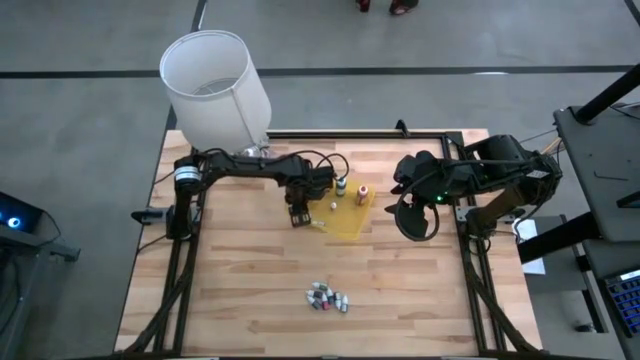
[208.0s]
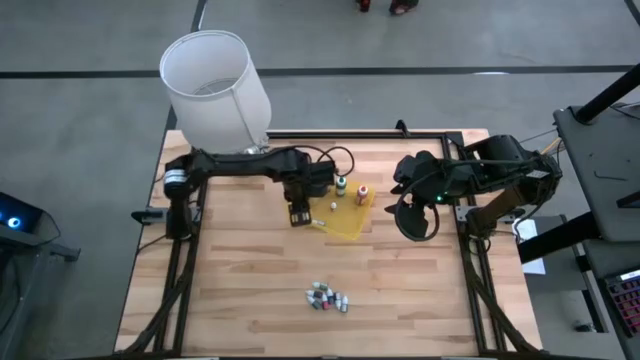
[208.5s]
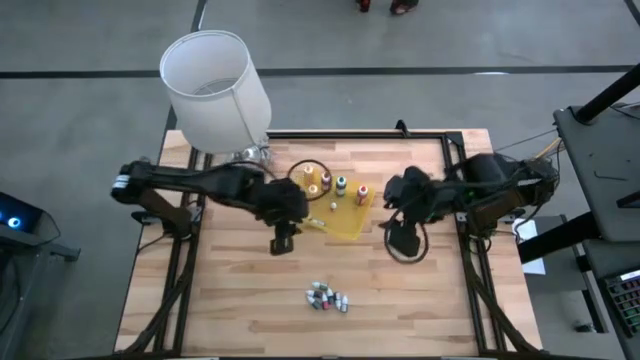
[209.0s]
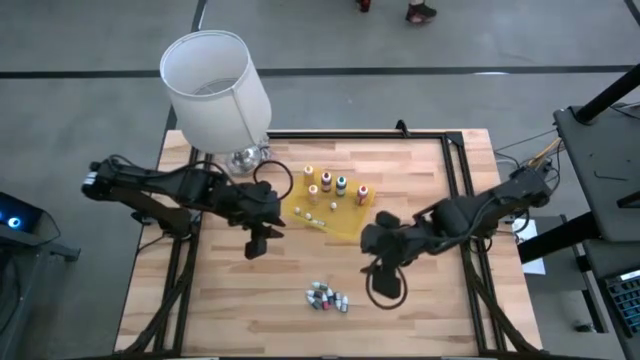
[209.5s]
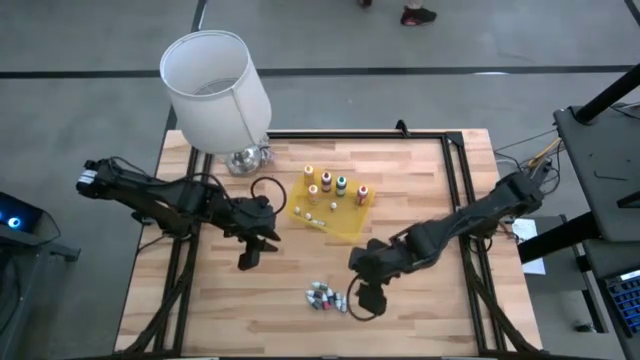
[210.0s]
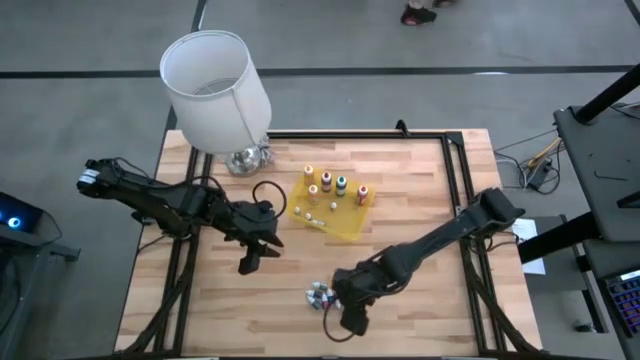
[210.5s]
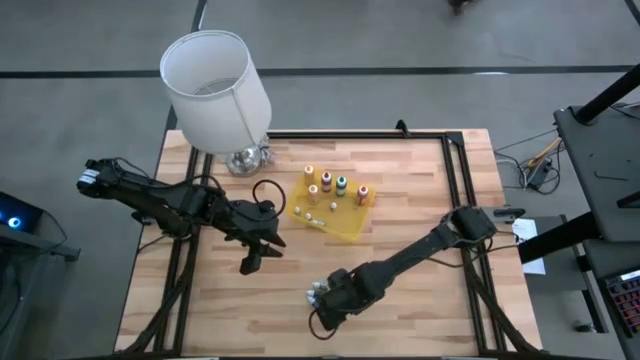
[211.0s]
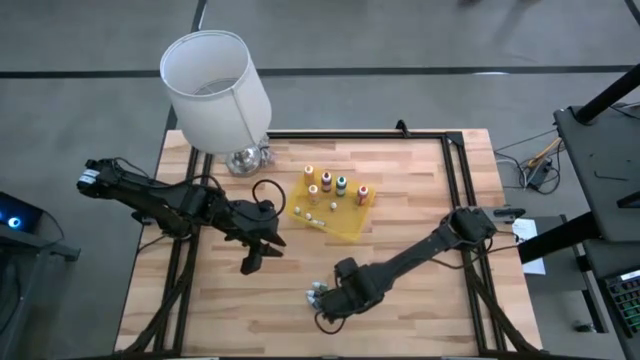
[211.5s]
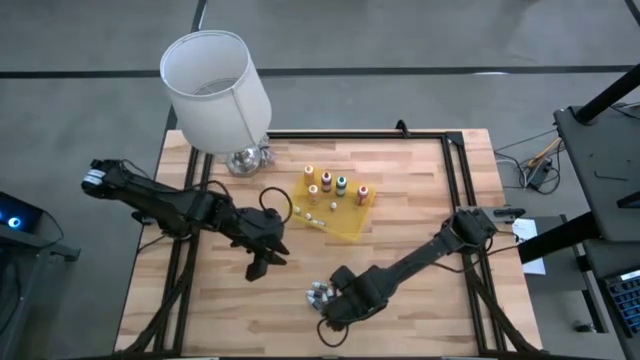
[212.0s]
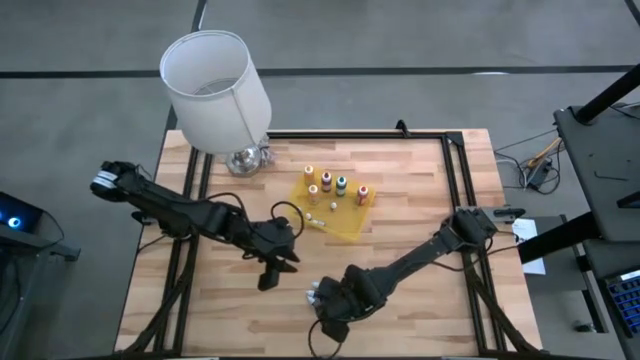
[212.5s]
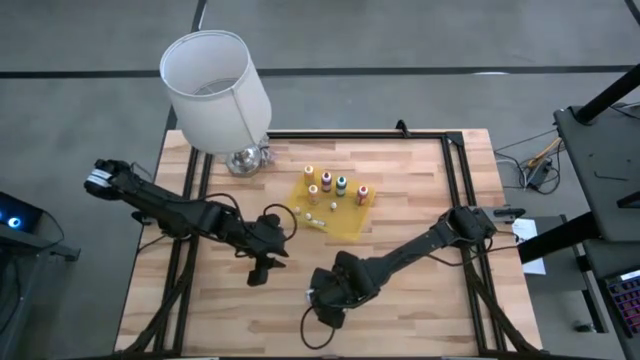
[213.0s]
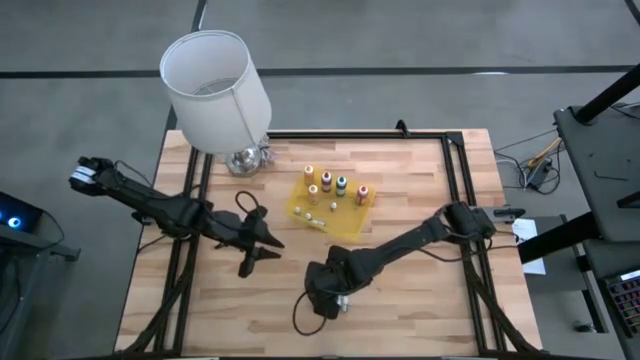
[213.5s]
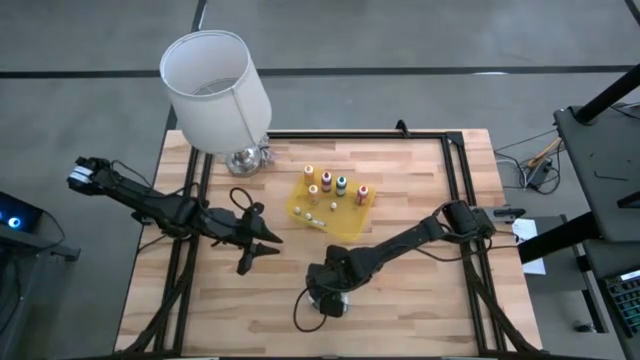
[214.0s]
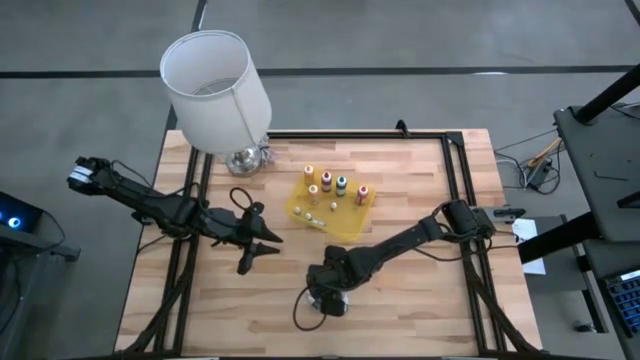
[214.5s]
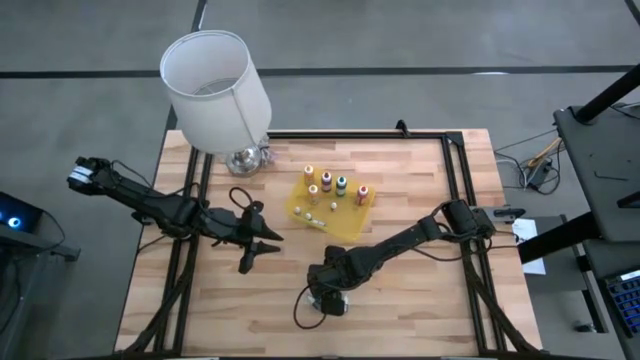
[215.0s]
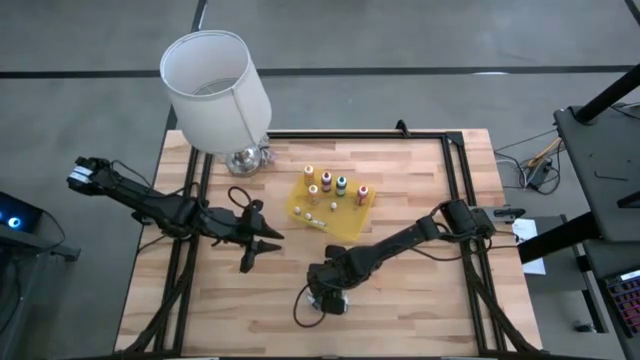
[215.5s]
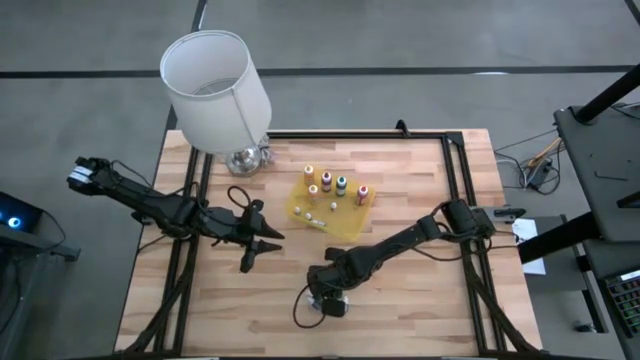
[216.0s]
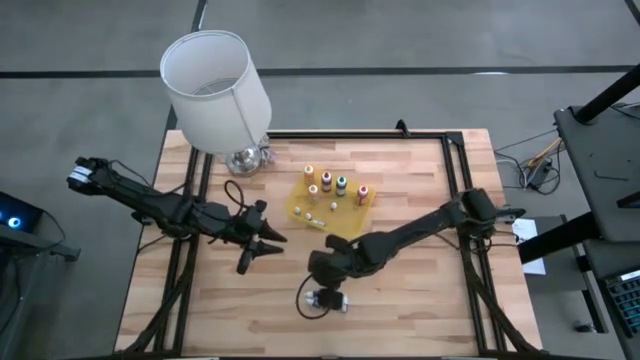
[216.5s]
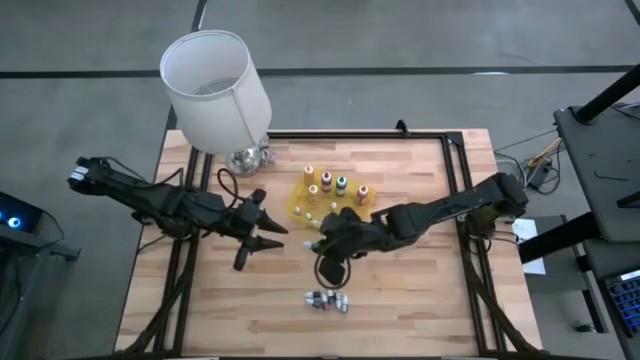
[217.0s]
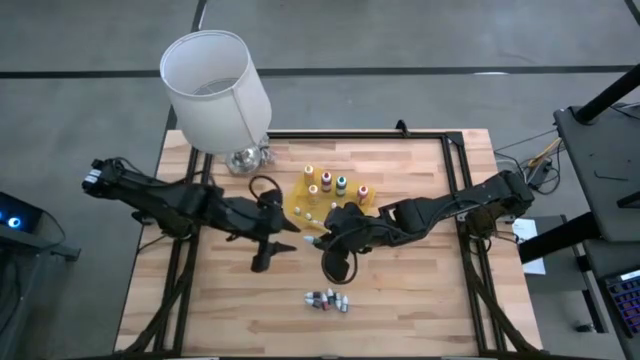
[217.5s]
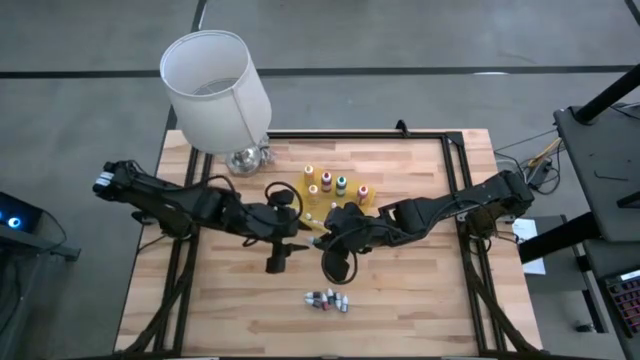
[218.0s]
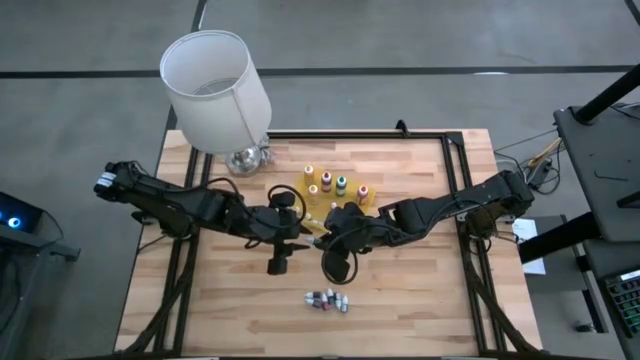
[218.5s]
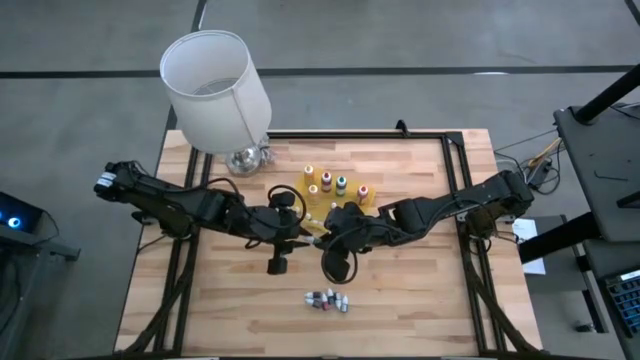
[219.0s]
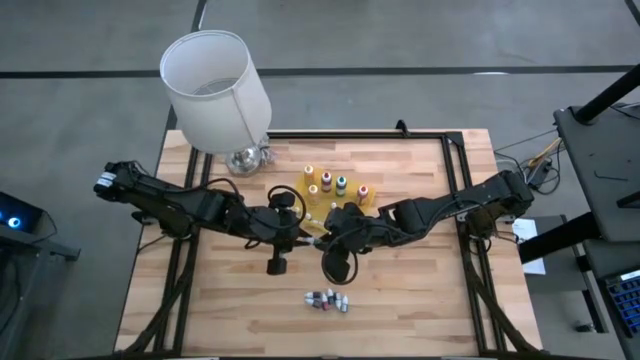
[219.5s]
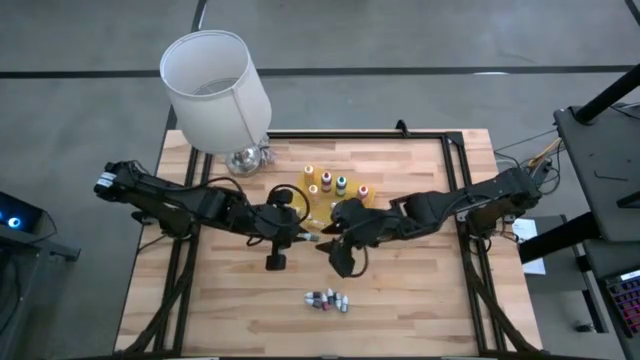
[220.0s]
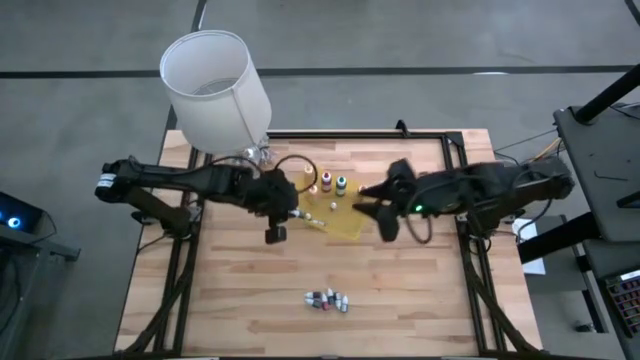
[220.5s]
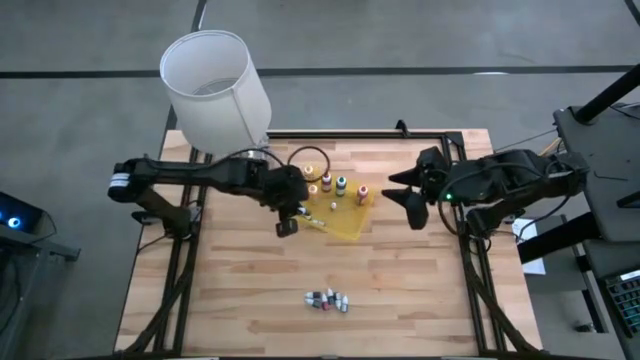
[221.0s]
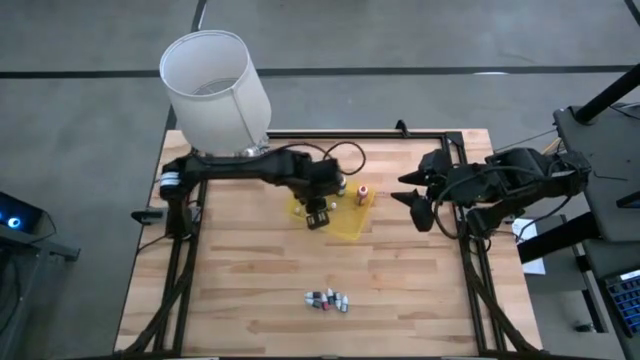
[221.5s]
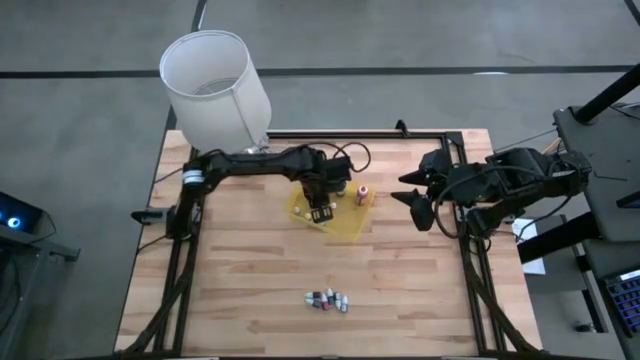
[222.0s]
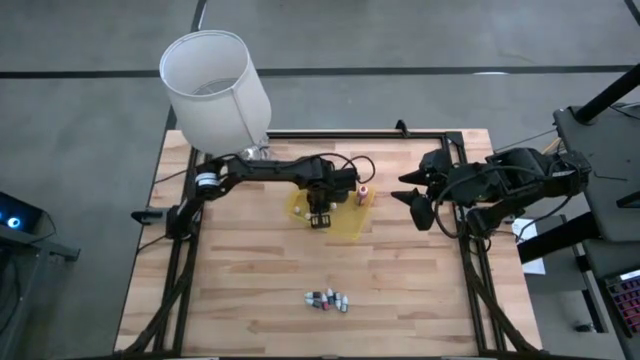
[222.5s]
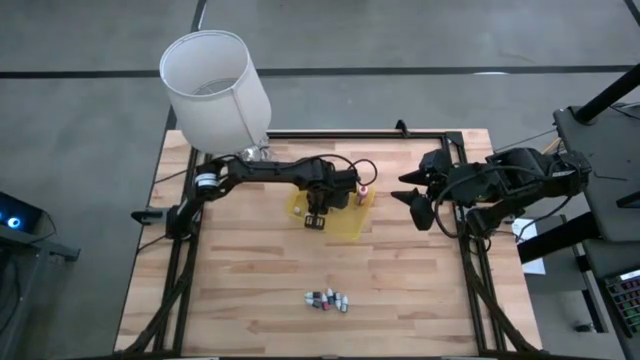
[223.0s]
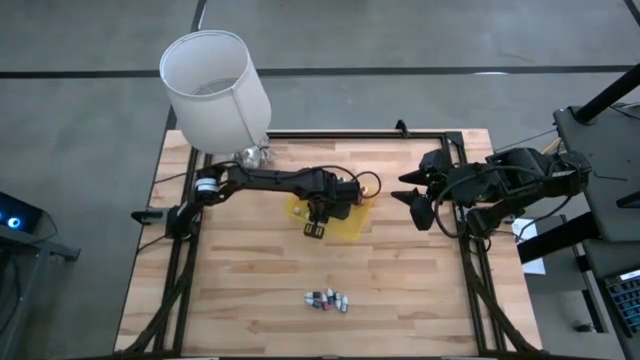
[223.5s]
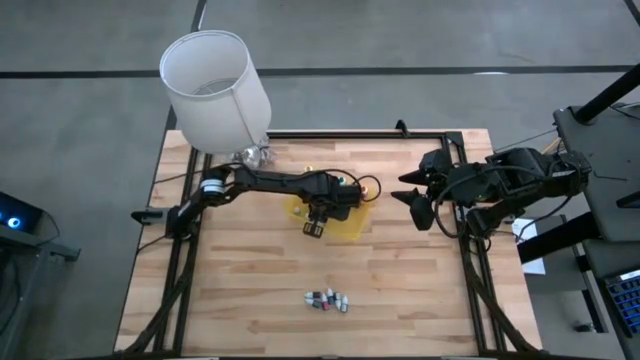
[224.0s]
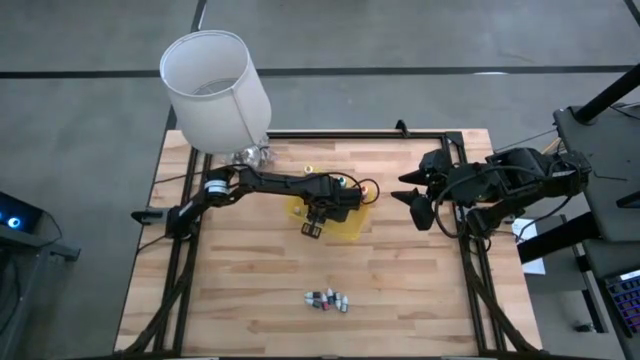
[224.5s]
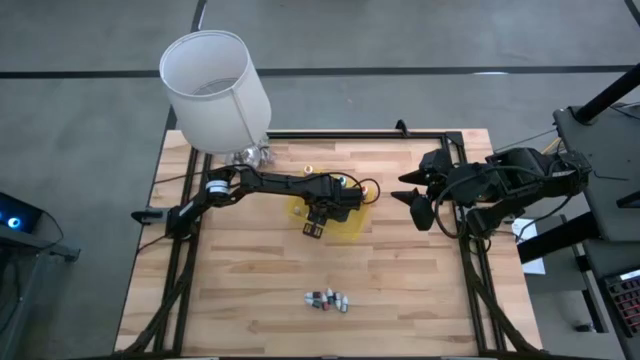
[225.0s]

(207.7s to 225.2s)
Task: Pick & Place food coloring
Put the small green food coloring bottle into the yellow bin

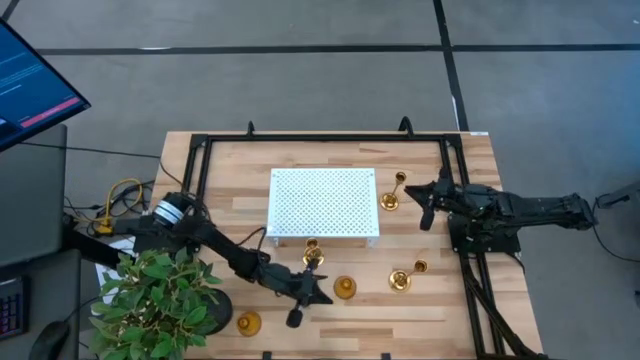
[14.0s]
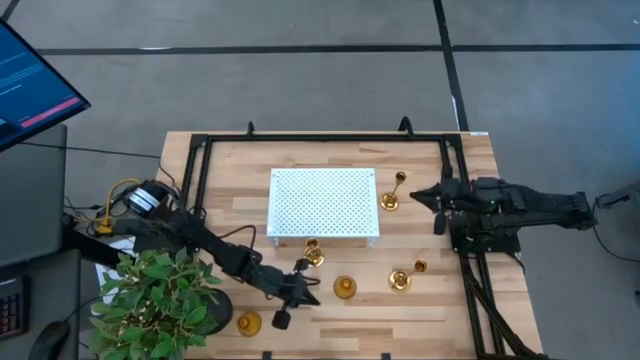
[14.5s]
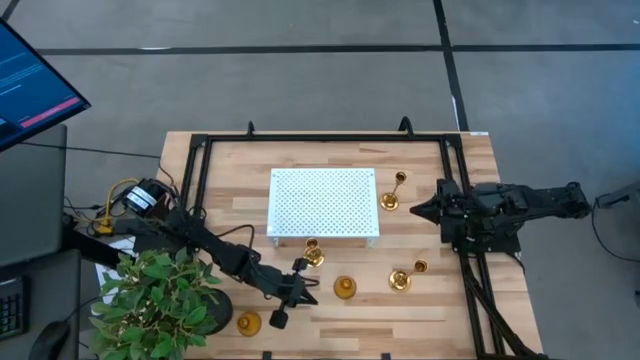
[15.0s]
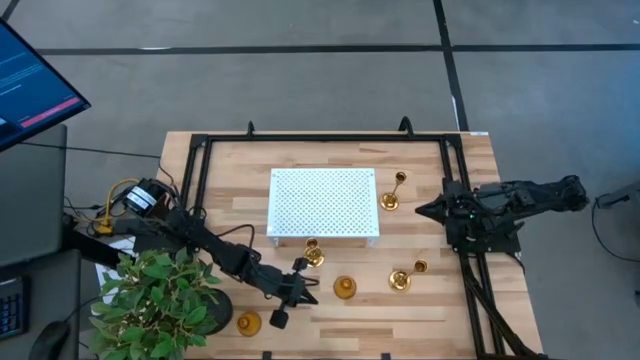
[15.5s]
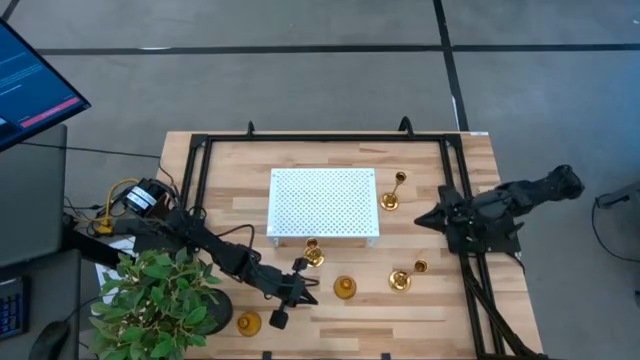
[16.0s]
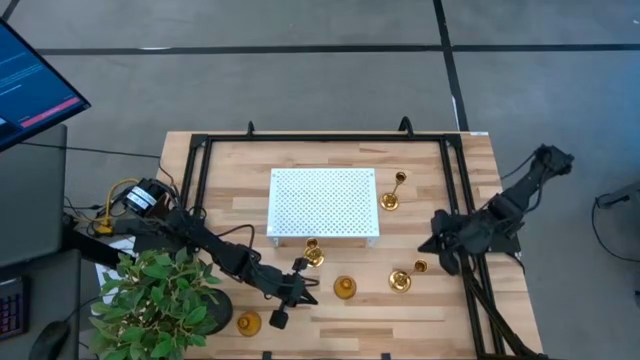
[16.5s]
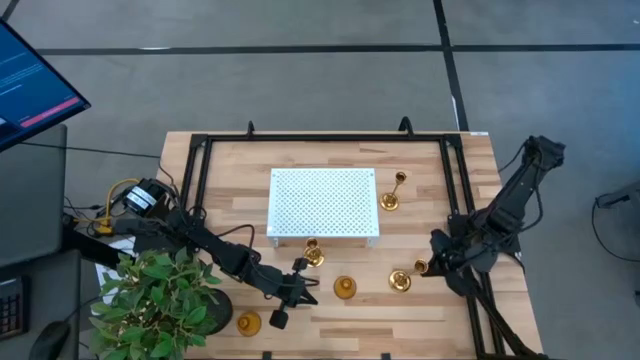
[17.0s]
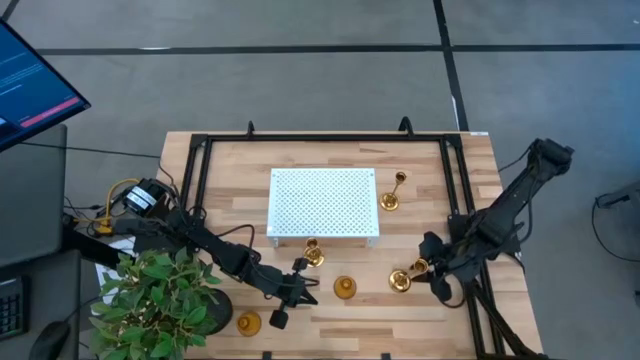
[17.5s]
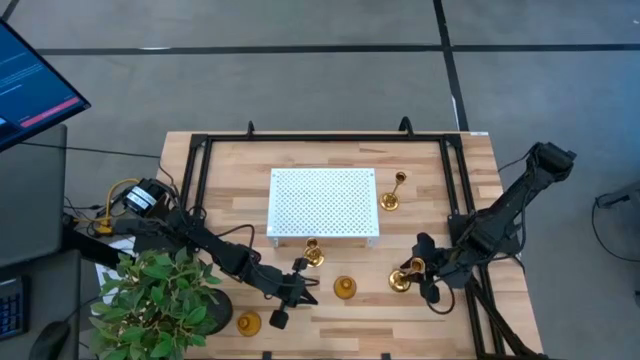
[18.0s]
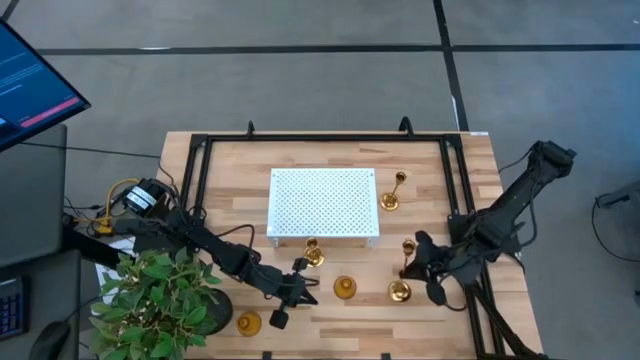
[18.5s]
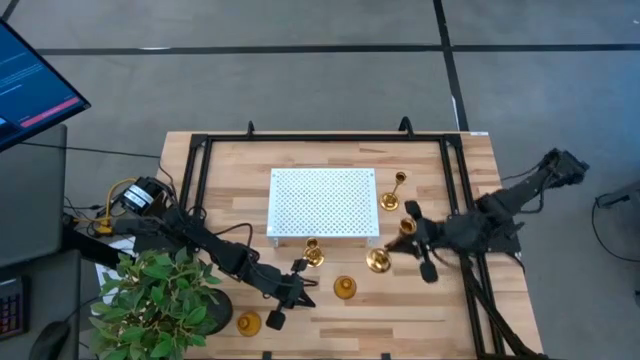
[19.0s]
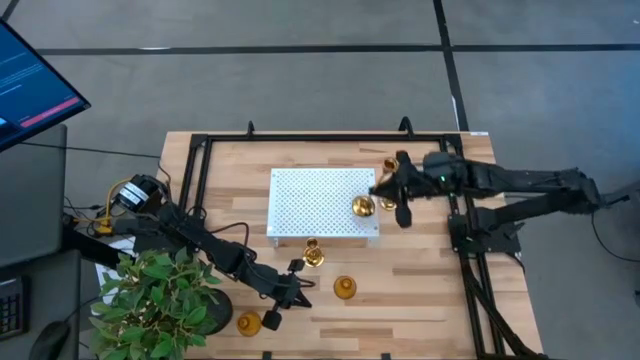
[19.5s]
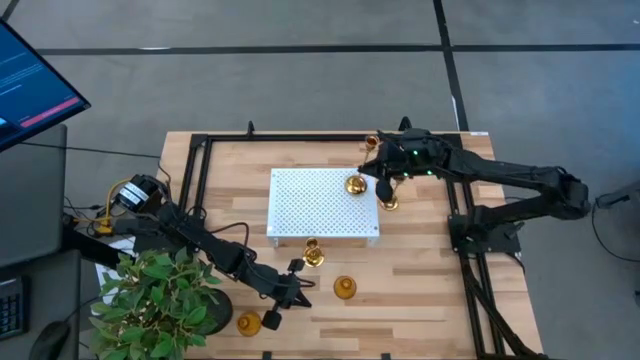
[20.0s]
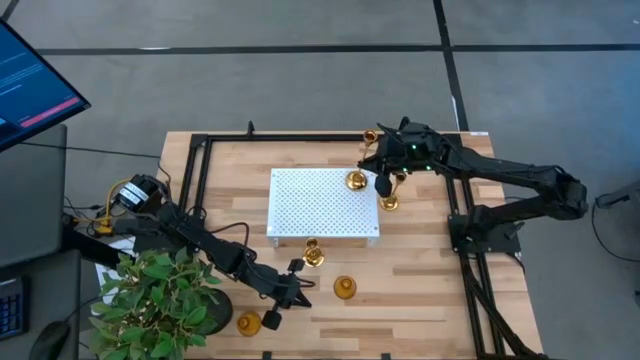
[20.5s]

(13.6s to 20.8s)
Task: Pick & Place candle stick holders
Put the bottom golden candle holder on the shelf
